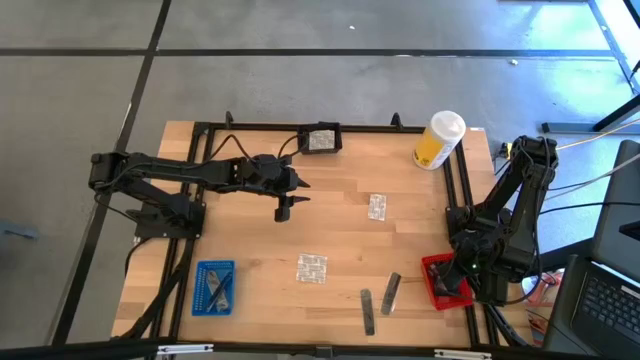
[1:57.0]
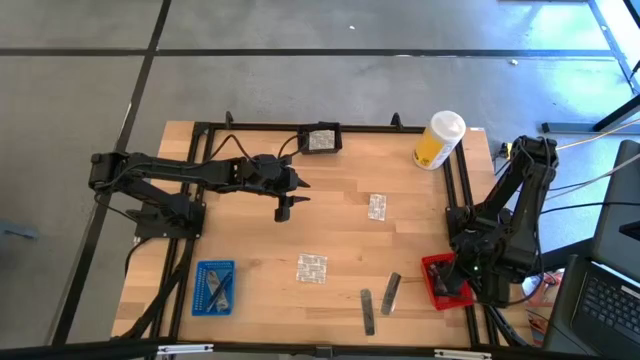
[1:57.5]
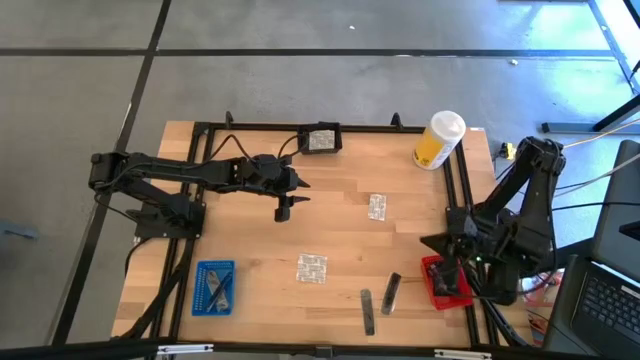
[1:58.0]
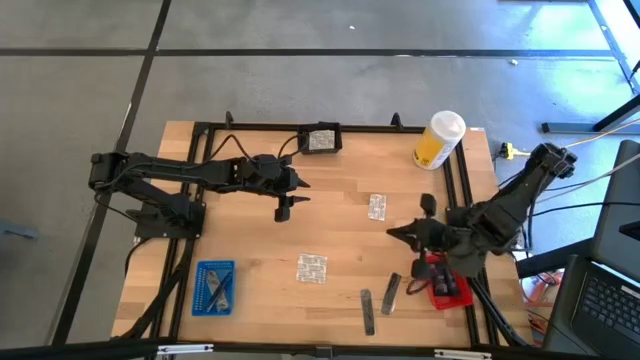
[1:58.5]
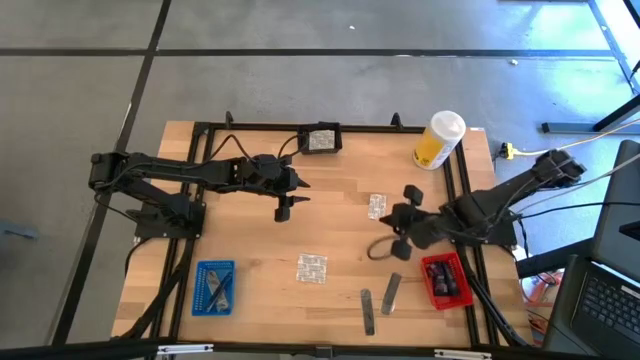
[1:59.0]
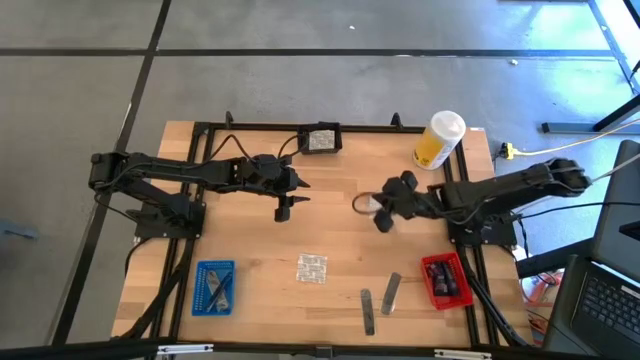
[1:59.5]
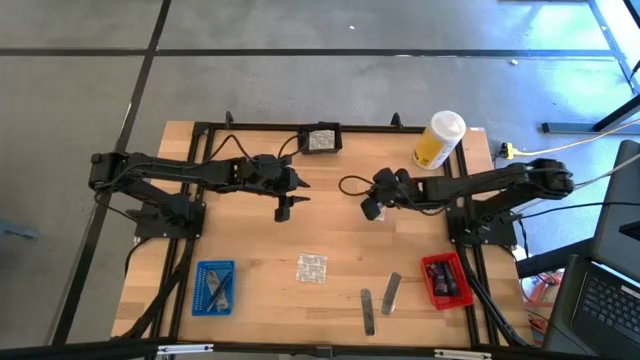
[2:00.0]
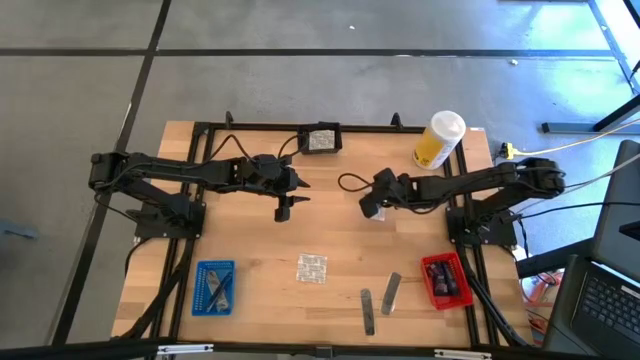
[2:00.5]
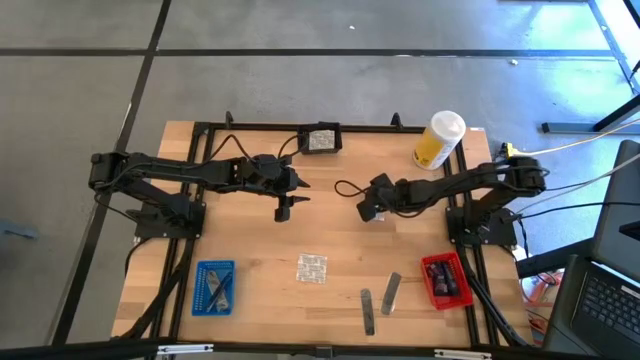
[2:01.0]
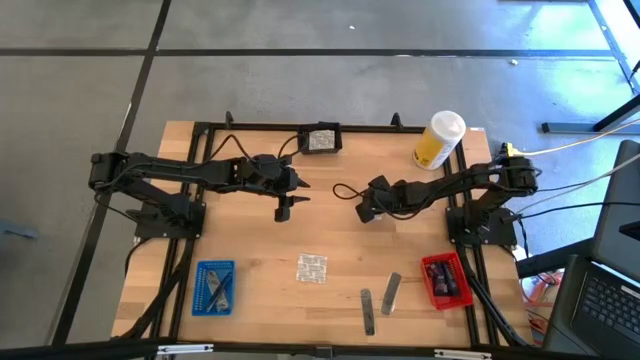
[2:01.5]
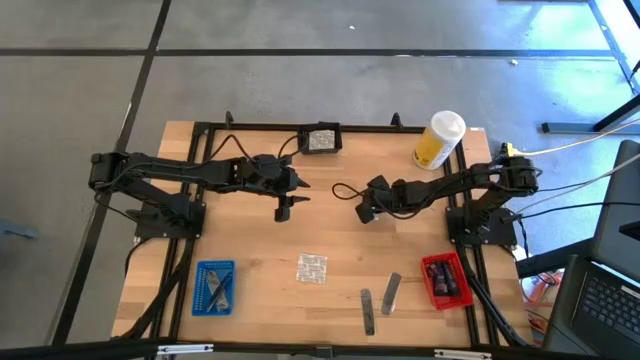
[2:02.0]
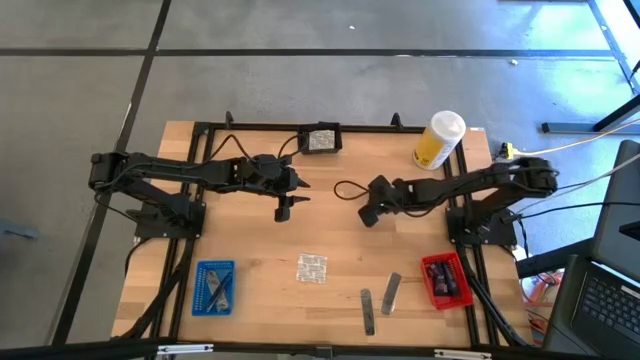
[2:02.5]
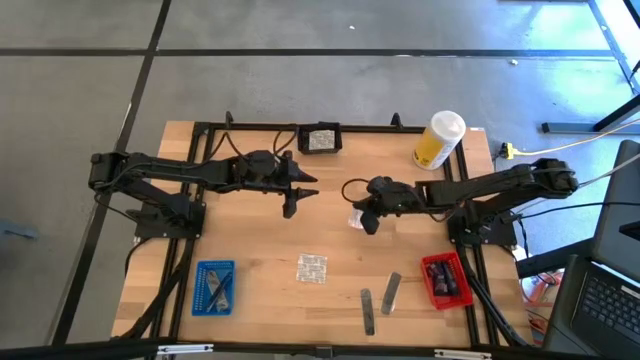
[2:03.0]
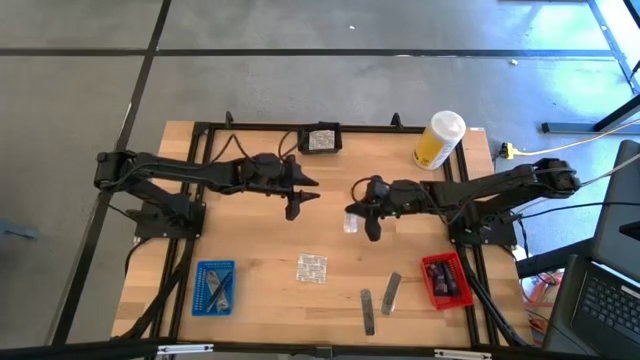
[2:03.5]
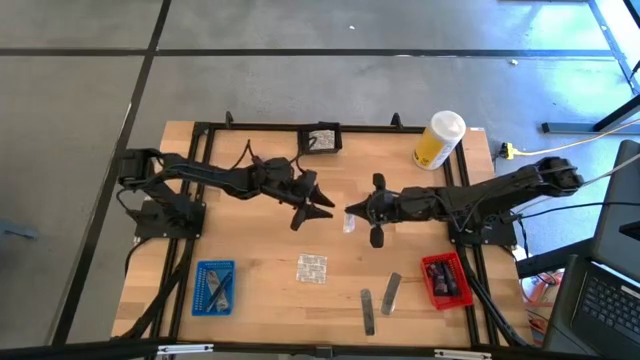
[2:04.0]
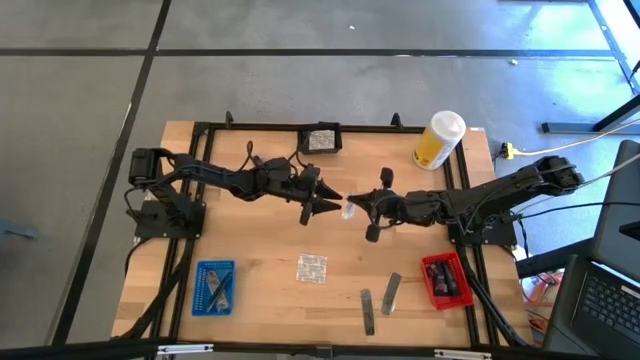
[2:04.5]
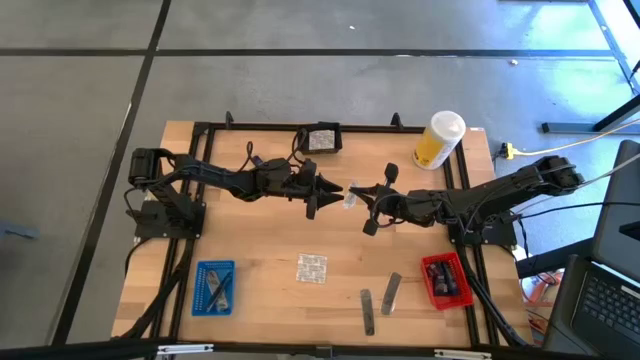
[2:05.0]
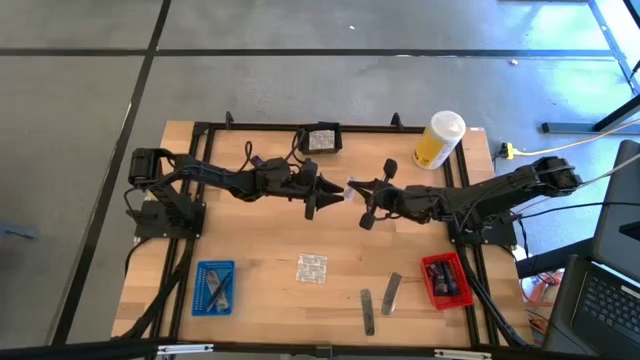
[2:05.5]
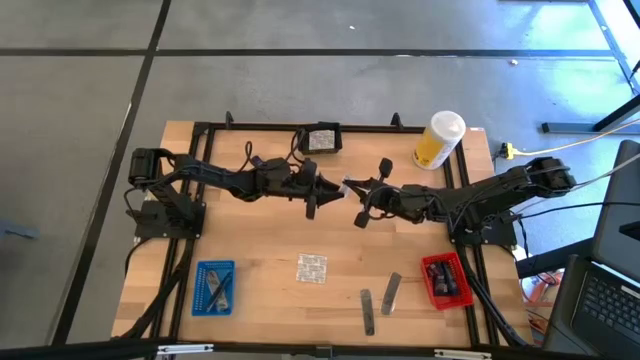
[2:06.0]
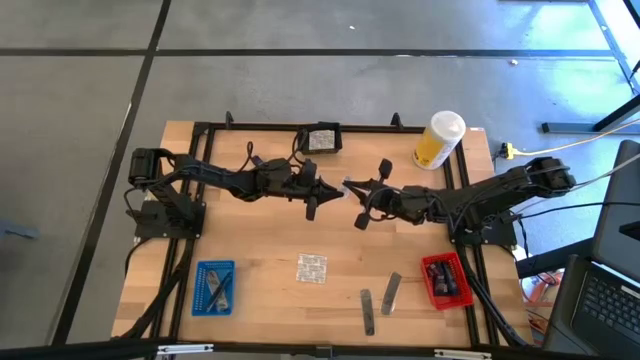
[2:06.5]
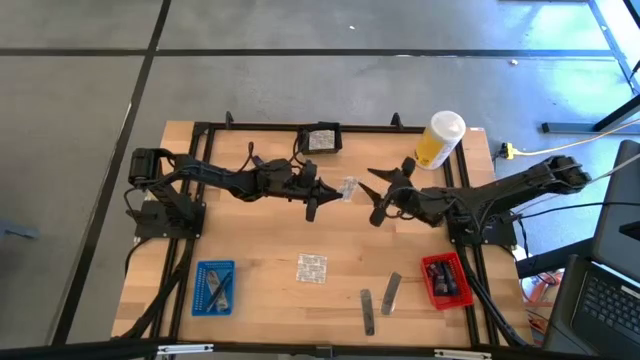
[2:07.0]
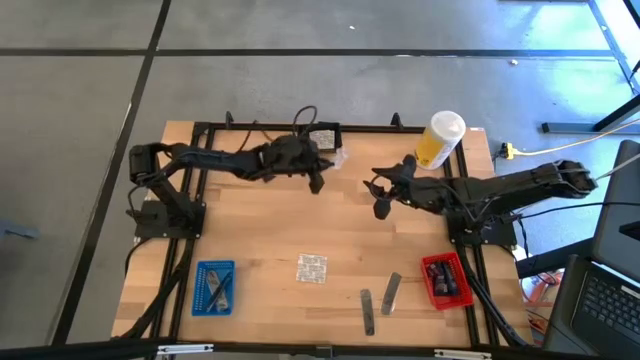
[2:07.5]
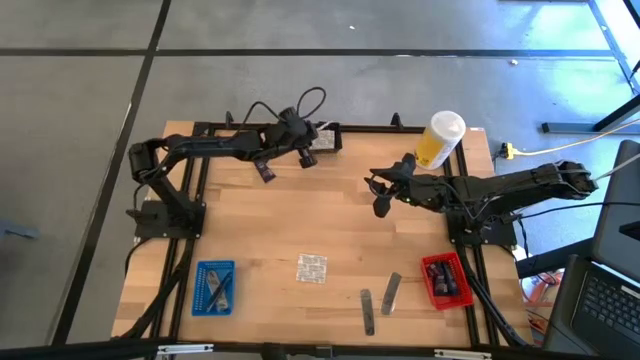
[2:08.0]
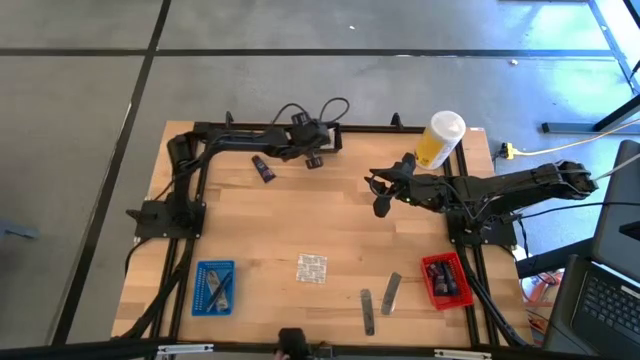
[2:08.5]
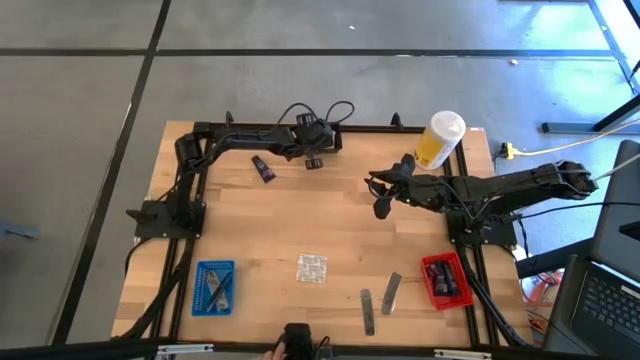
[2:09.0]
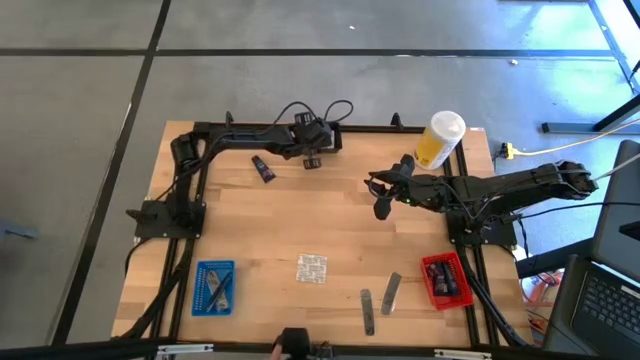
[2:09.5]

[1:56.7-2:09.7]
Task: Pick & Place Travel size toiletries
Put the white bandage into the black bin

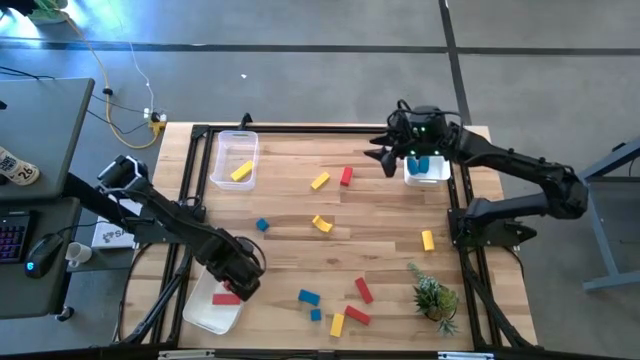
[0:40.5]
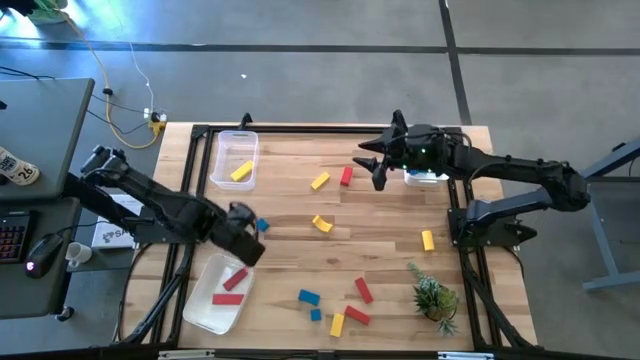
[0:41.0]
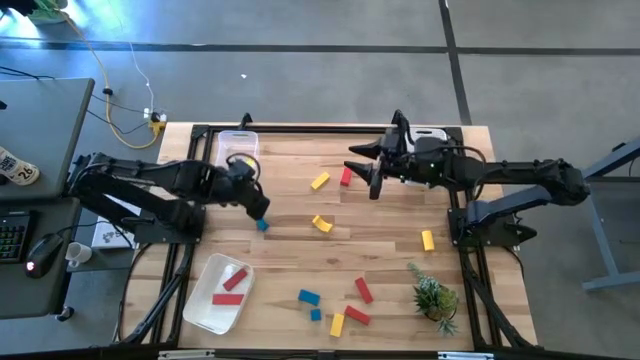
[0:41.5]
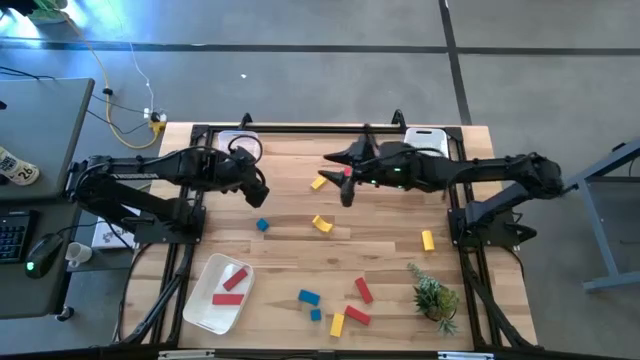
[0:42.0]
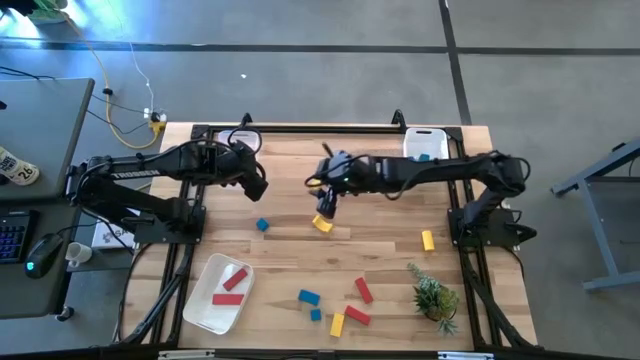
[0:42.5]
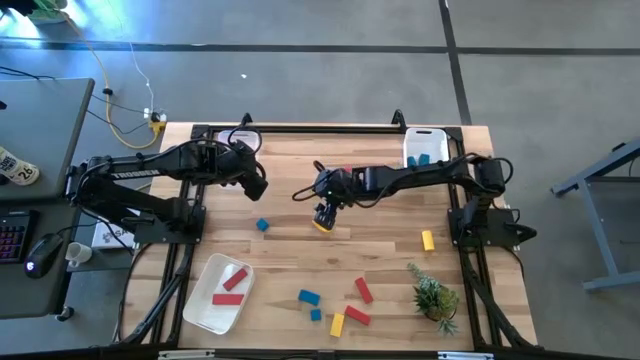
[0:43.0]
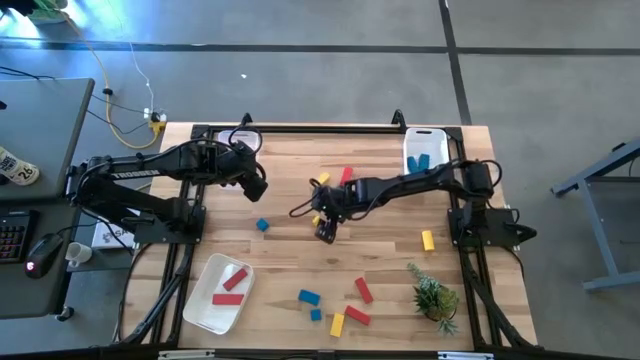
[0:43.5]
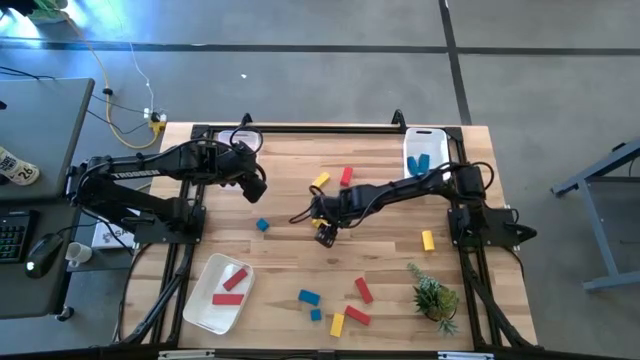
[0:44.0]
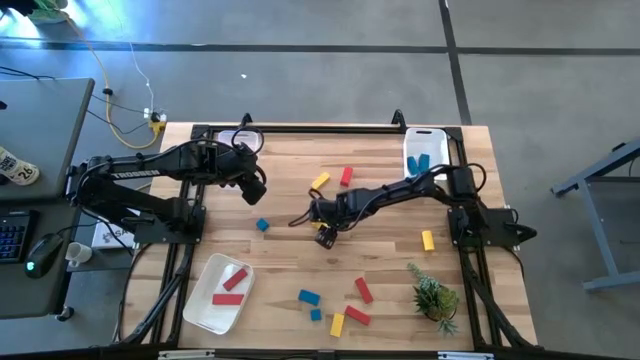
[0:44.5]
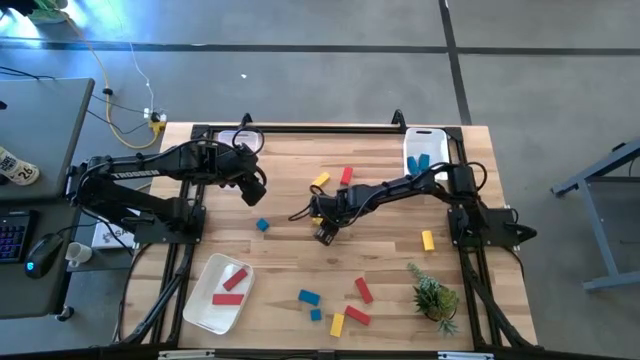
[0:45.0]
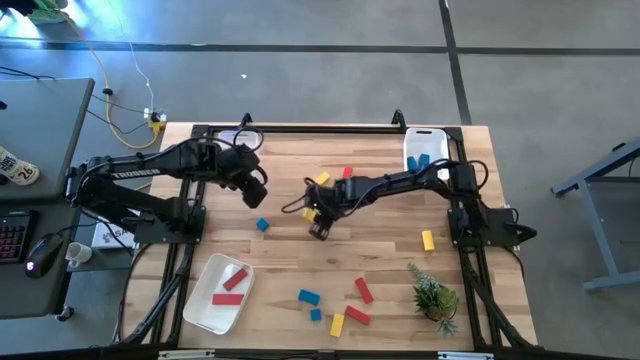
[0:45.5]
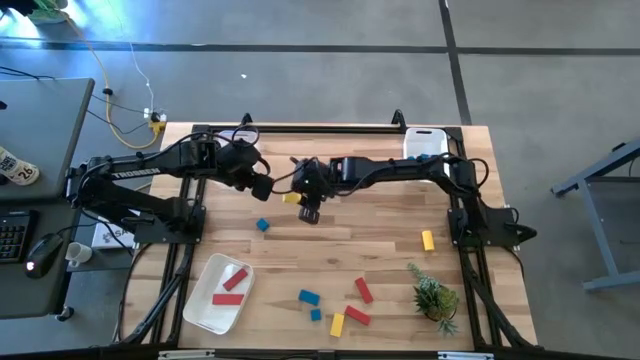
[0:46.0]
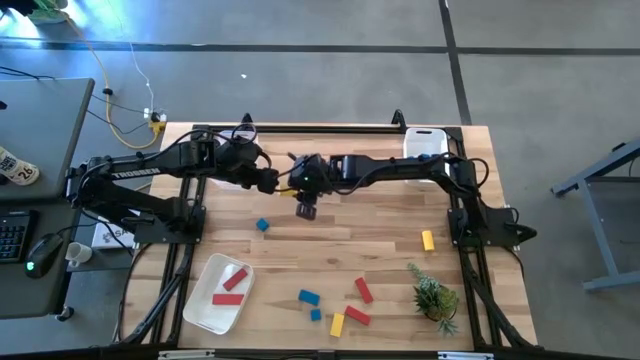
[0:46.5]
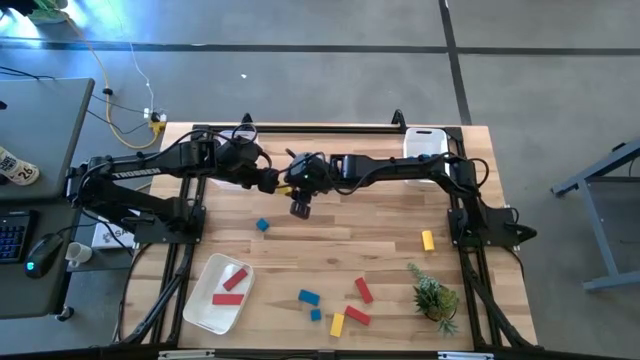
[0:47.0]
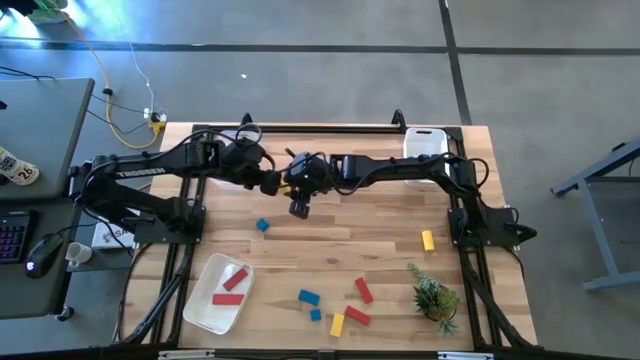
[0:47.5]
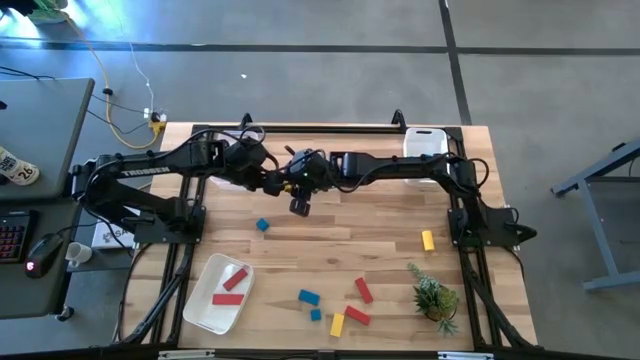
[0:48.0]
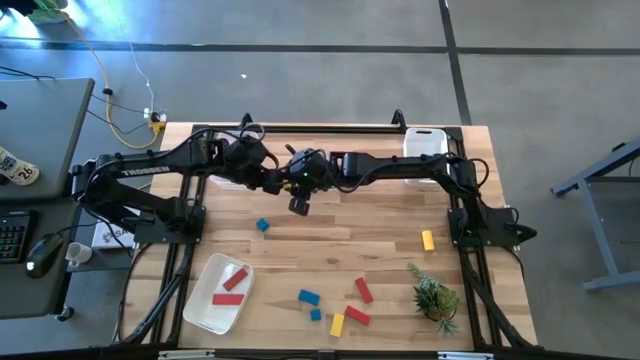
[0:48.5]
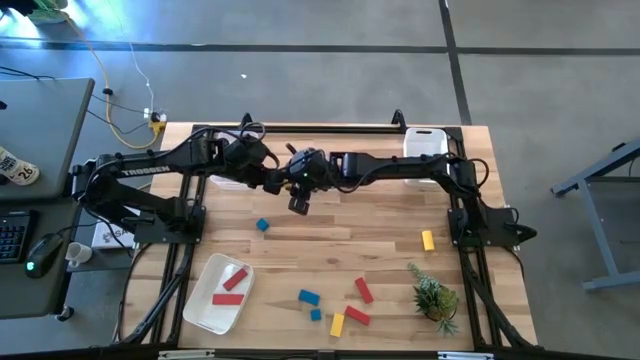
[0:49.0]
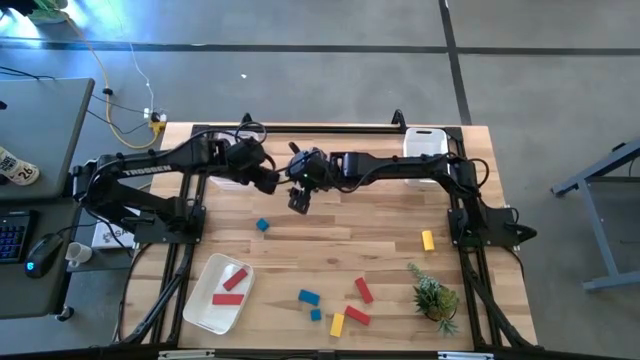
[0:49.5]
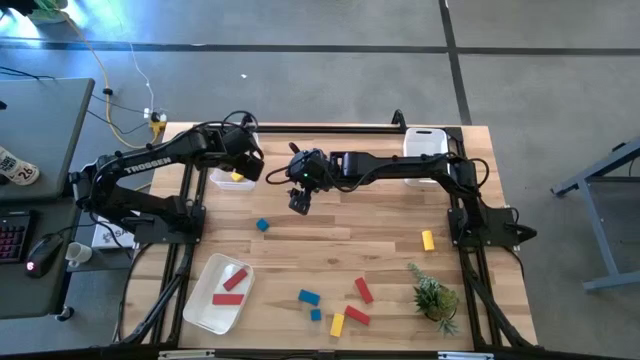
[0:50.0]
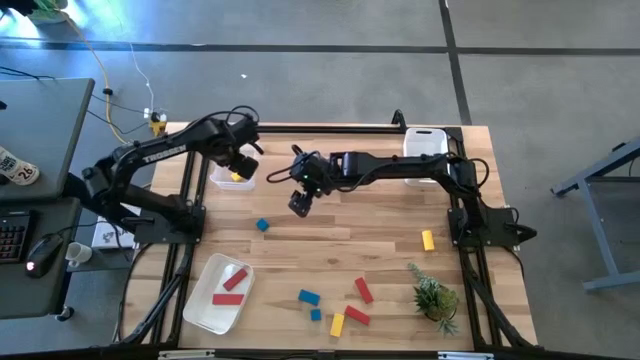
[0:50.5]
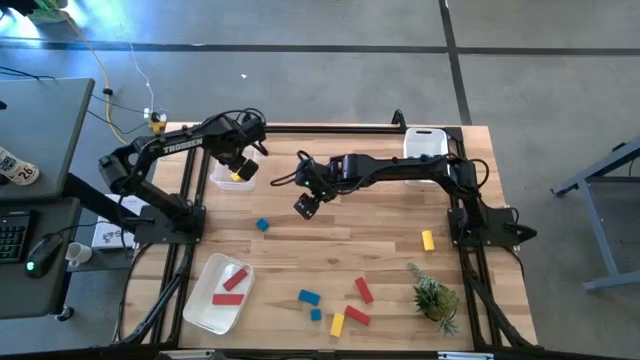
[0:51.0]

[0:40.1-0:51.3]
Task: Sort & place blocks by color
Put the yellow block into the transparent bin
